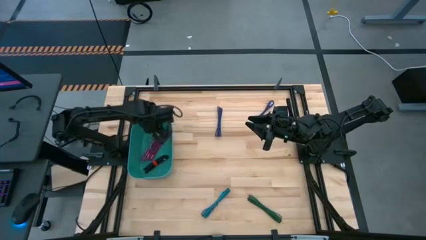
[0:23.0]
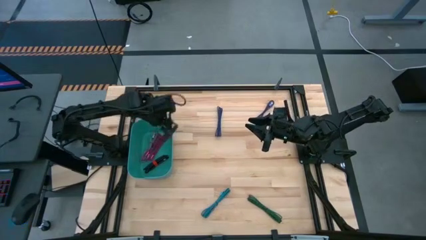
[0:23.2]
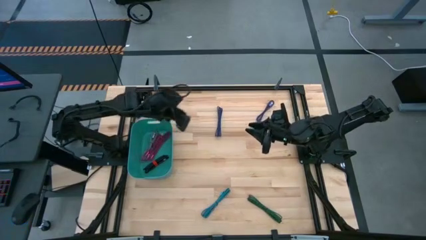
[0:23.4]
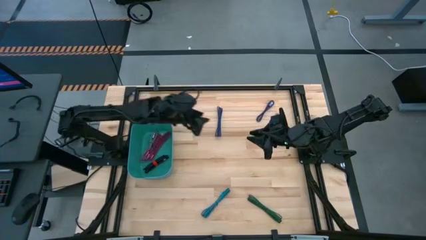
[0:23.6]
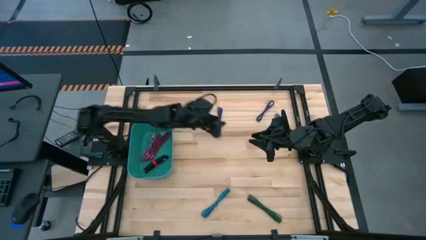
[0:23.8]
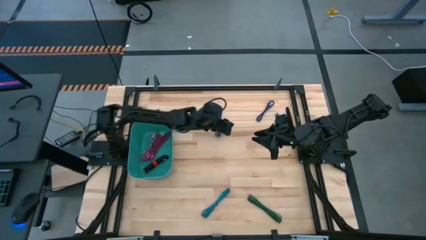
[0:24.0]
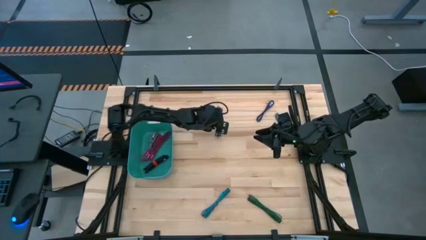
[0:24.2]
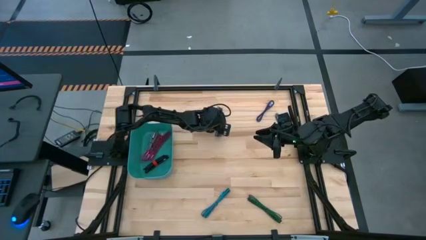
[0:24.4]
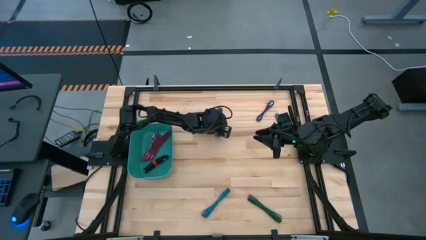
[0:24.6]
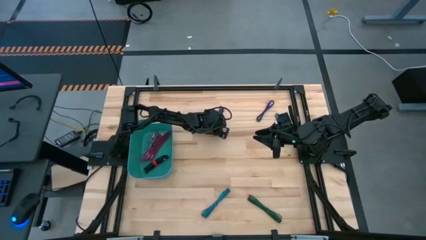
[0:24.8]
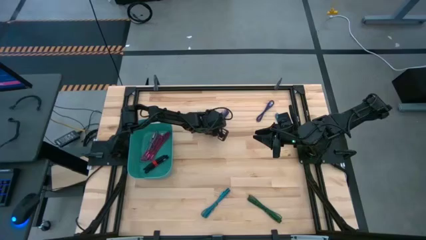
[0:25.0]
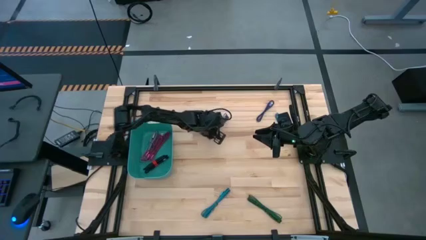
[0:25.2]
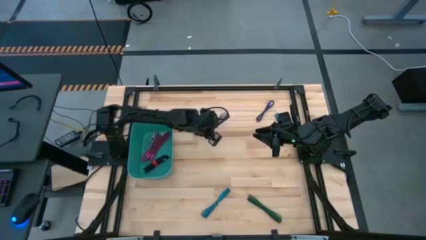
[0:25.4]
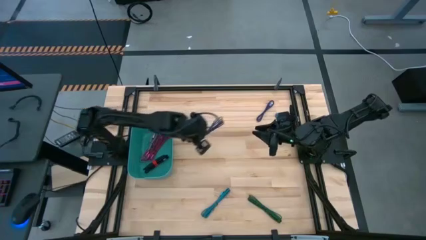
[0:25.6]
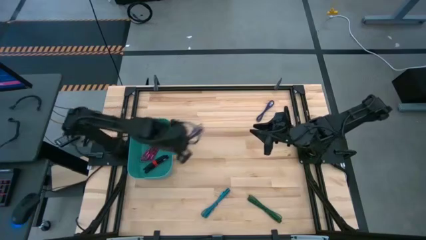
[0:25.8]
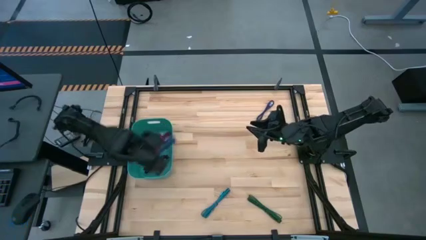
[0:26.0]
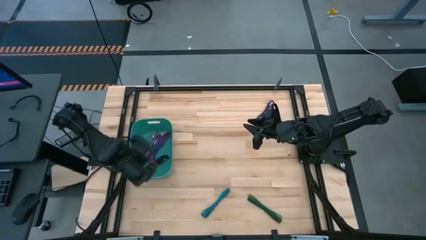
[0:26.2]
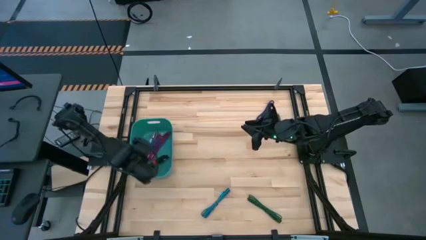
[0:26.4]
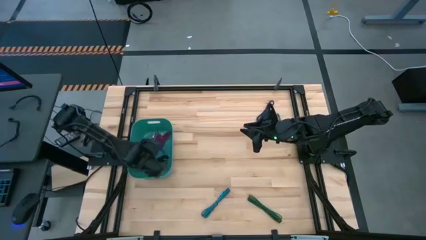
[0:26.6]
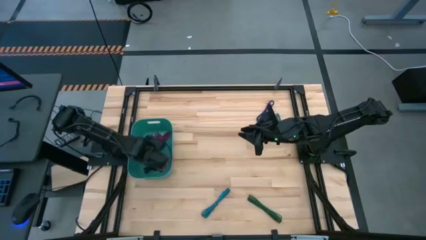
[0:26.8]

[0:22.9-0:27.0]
Task: Pick and place USB-C Cables
Put the left purple charger cable into the blue bin

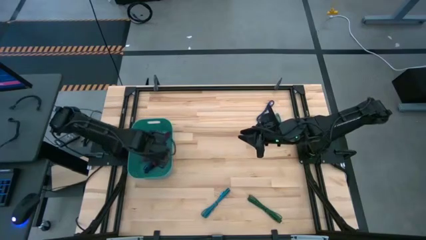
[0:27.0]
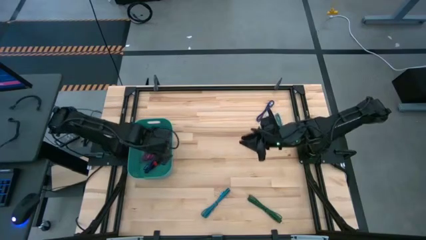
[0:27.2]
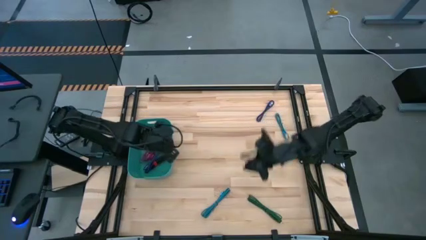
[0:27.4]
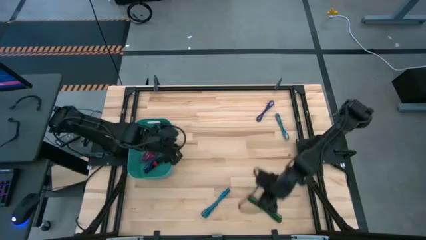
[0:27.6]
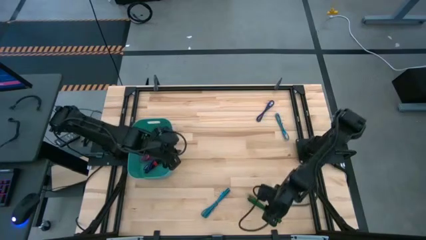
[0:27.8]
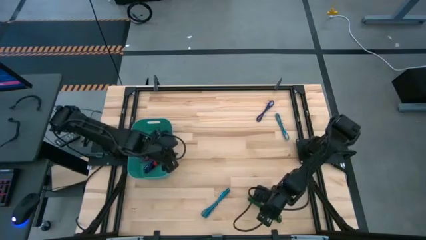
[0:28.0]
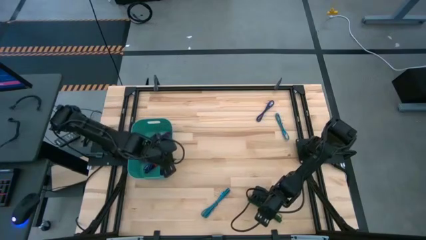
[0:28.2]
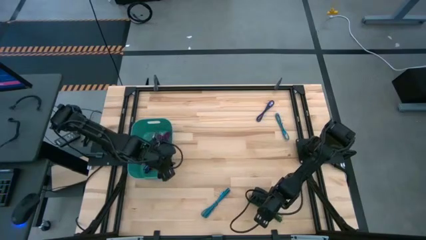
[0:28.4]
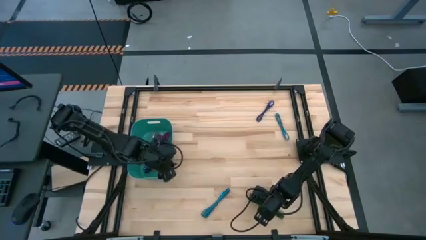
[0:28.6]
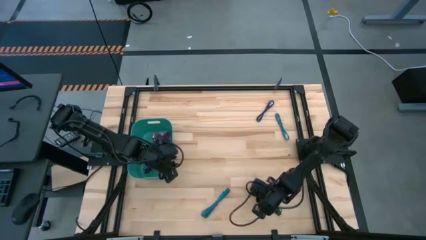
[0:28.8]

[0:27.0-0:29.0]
Put the green charger cable into the blue bin

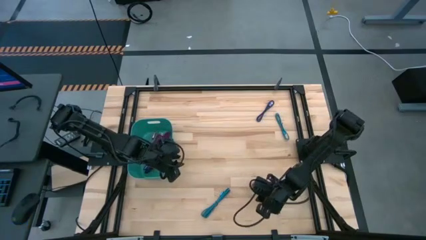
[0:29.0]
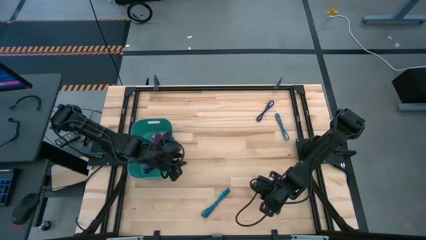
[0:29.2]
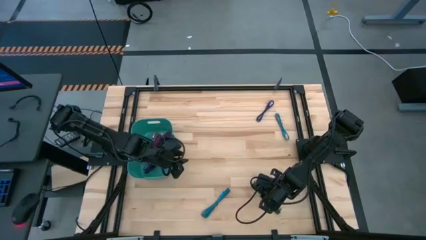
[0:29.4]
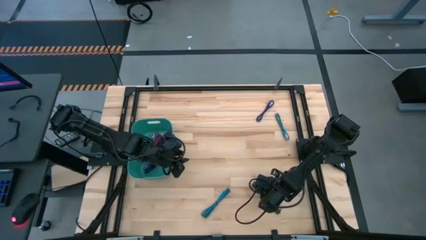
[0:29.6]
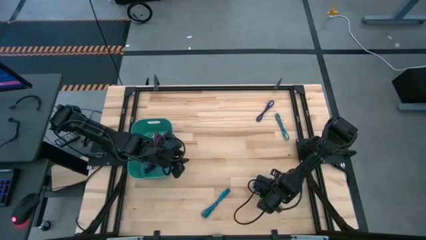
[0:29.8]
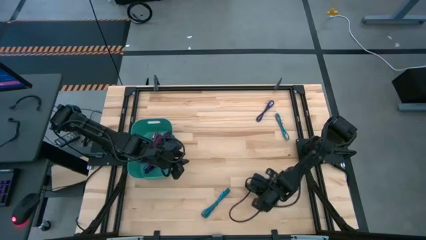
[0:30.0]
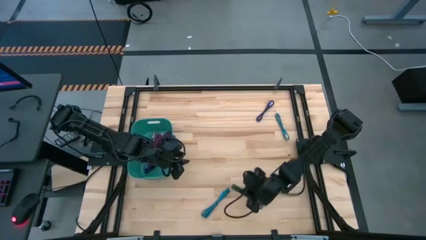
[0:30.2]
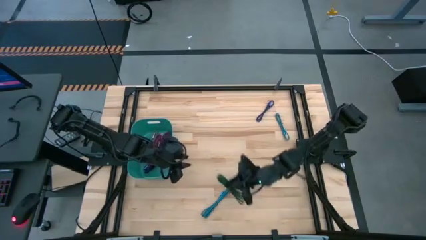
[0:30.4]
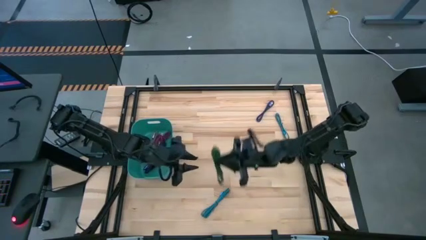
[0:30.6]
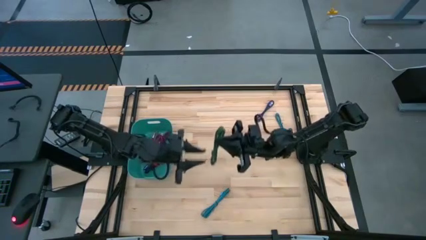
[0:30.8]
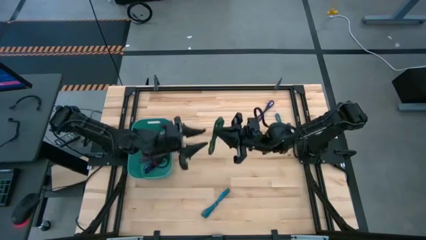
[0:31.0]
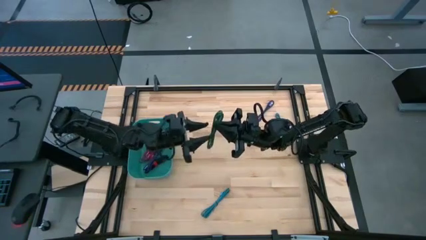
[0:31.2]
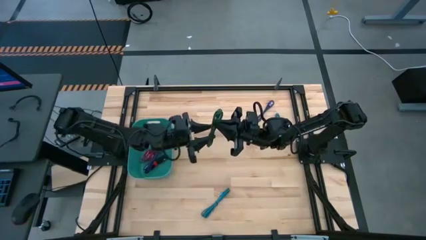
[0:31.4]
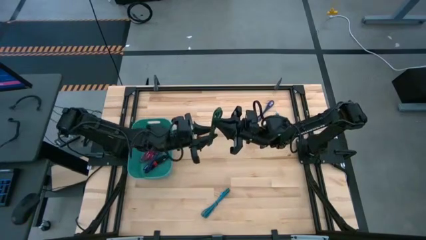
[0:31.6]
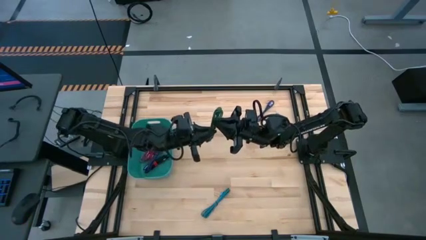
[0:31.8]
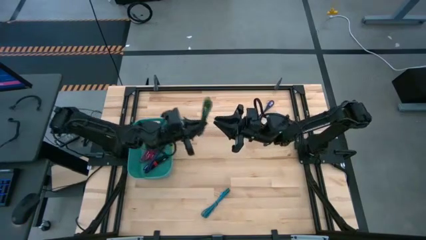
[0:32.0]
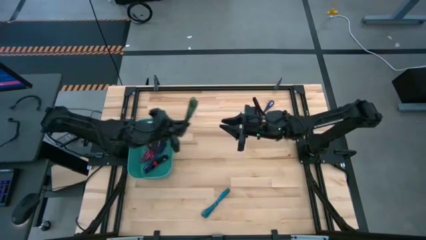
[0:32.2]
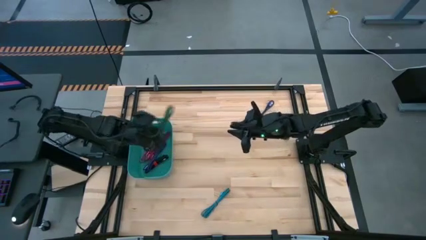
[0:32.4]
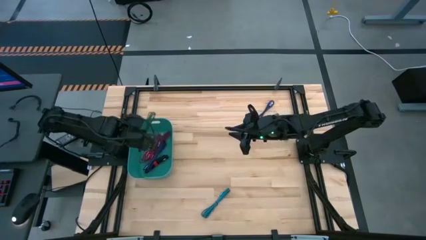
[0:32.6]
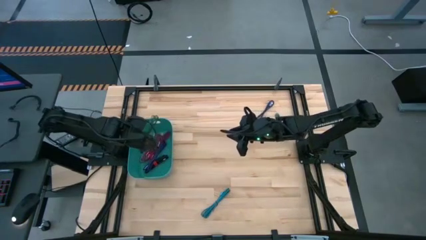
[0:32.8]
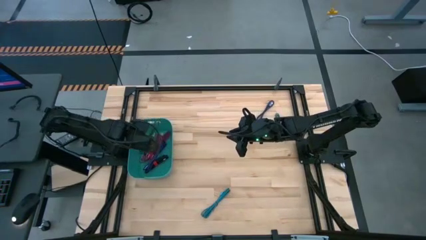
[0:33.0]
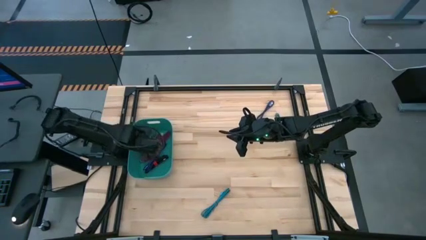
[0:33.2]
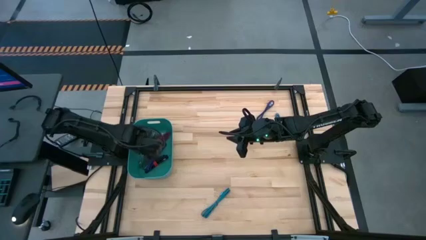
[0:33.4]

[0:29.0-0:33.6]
Put the green charger cable into the blue bin

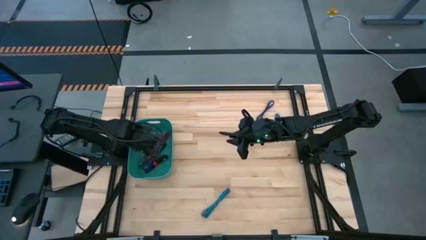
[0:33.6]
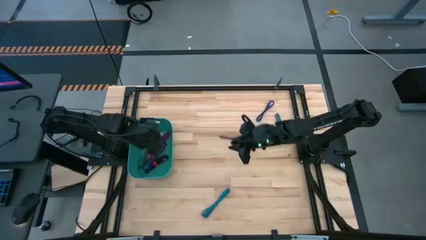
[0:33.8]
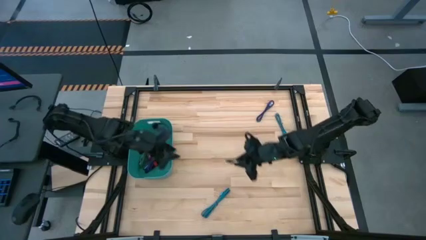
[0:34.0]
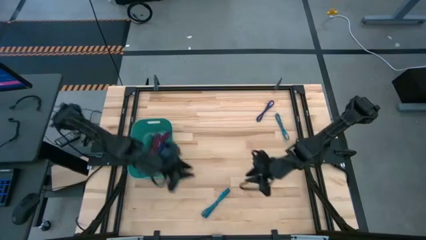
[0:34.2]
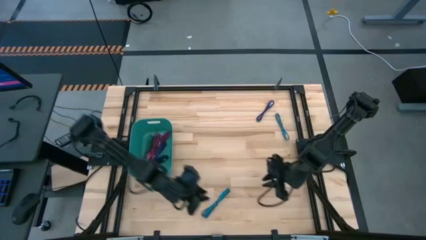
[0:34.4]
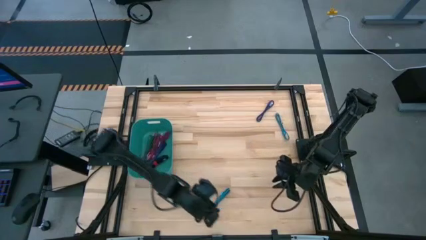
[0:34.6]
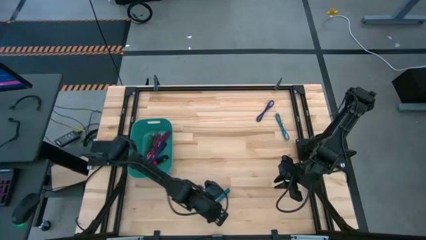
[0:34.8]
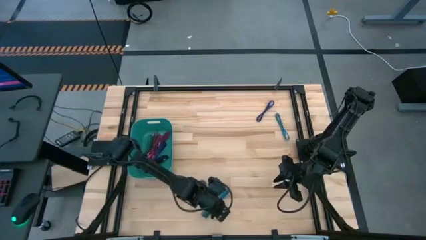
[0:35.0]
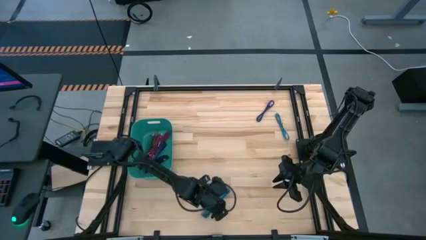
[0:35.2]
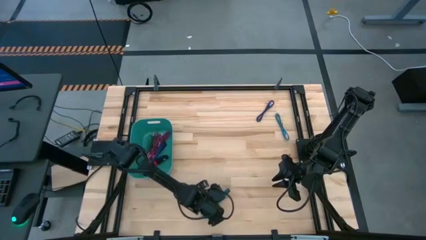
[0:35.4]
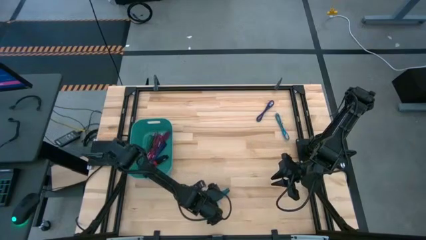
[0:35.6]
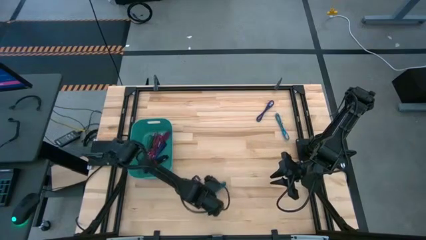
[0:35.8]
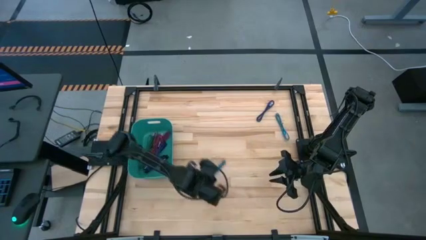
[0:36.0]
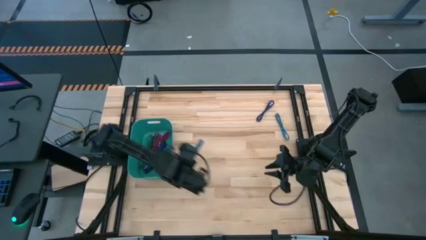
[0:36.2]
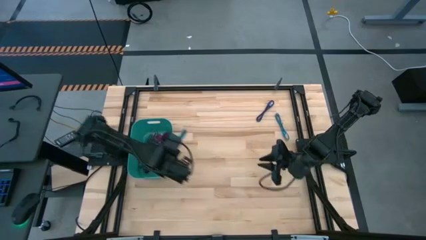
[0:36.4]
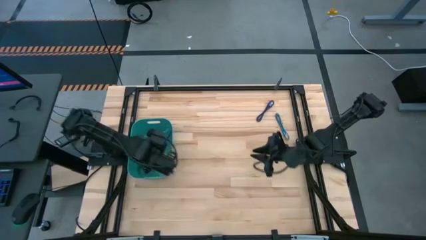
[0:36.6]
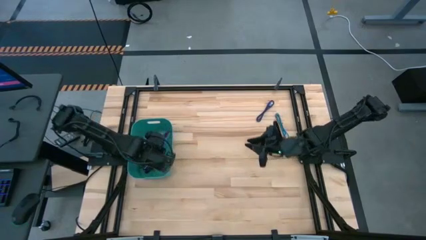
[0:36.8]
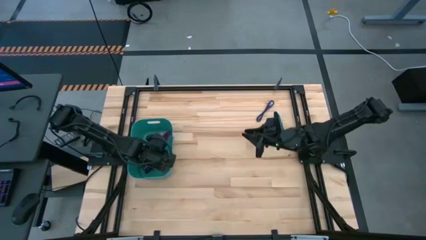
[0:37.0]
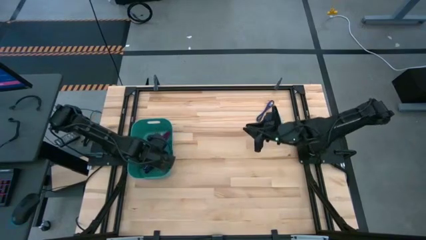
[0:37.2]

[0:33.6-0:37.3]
Put the bottom blue charger cable into the blue bin

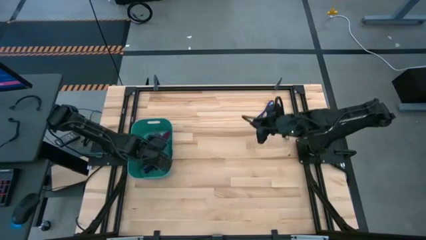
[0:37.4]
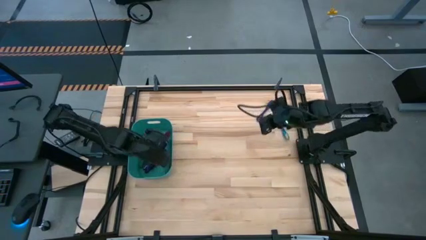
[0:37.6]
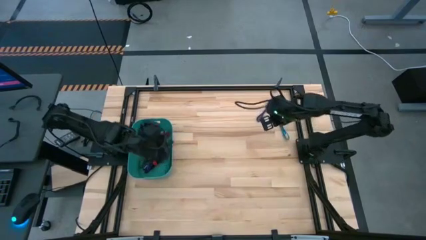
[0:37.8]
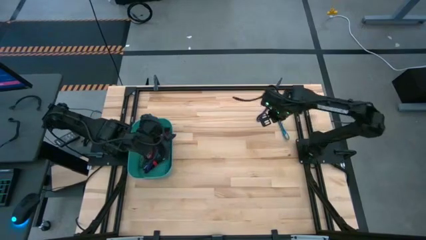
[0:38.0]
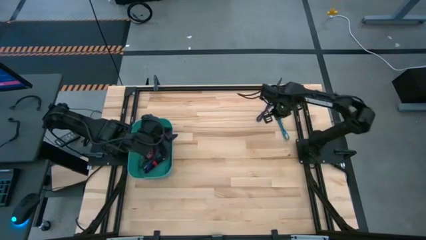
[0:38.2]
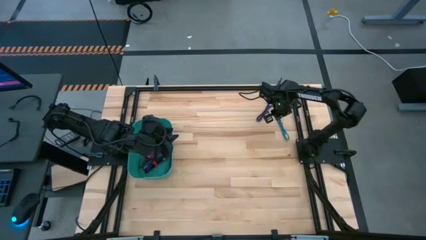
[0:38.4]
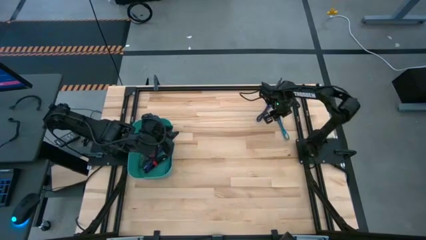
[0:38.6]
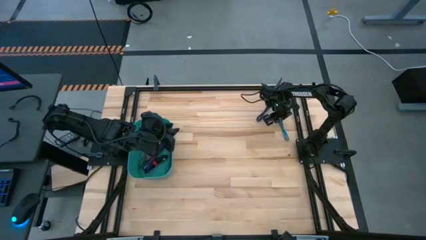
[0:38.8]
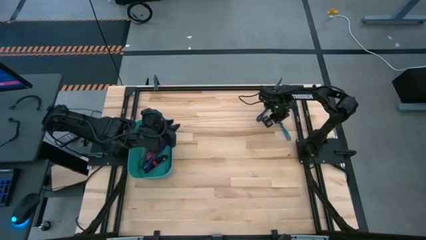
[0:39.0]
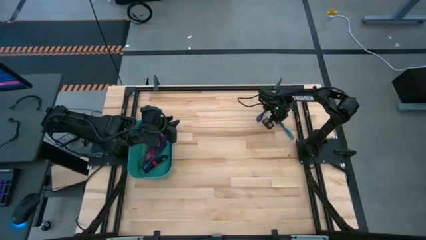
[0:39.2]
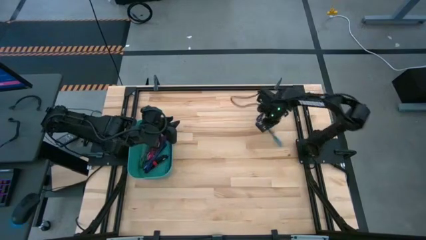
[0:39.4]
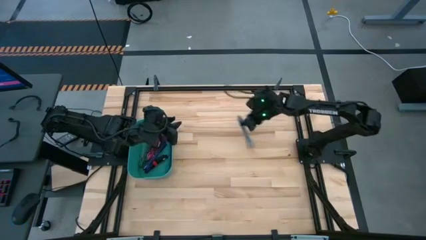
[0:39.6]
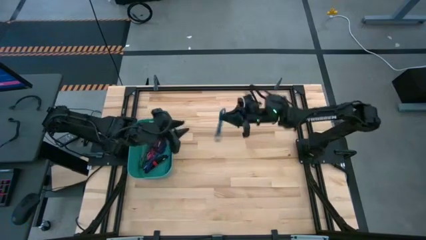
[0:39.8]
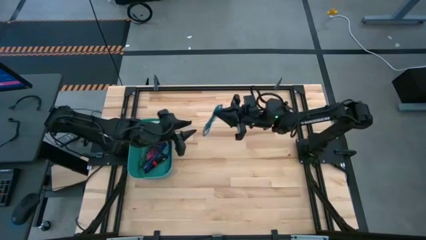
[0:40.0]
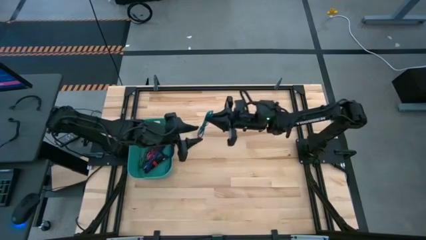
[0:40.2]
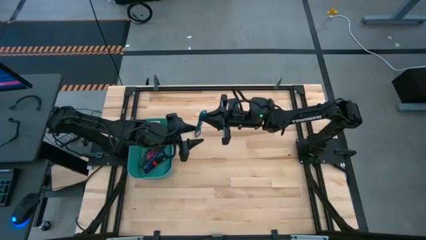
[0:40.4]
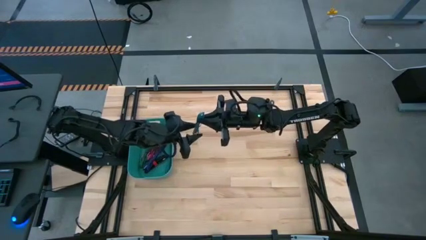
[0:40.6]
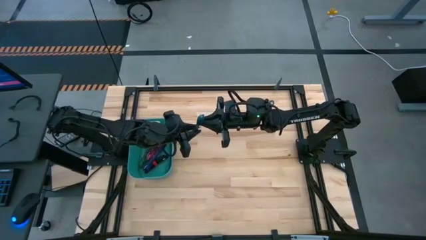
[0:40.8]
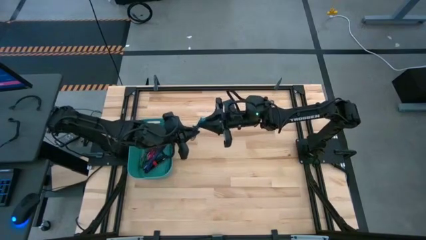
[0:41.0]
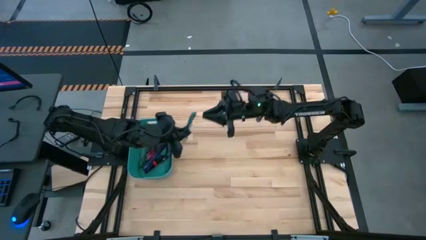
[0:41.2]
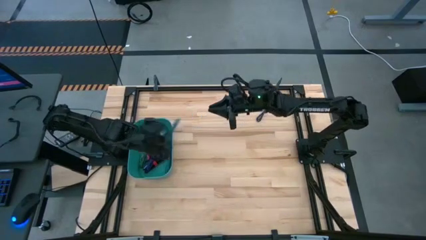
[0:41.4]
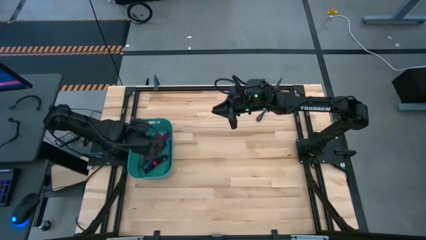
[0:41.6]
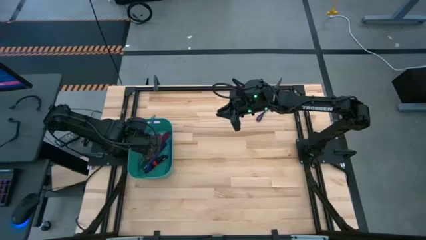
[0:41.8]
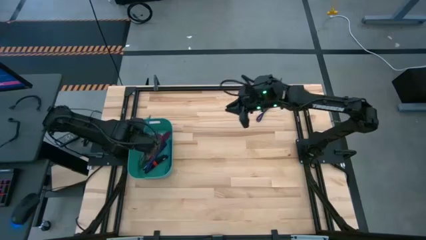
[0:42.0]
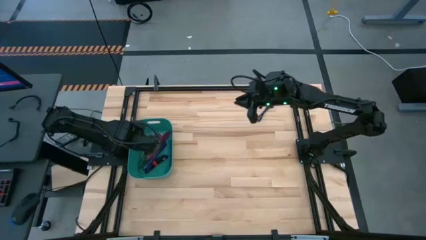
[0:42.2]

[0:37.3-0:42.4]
Put the blue charger cable into the blue bin
